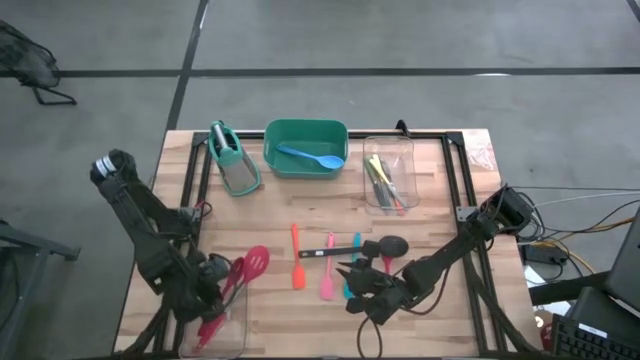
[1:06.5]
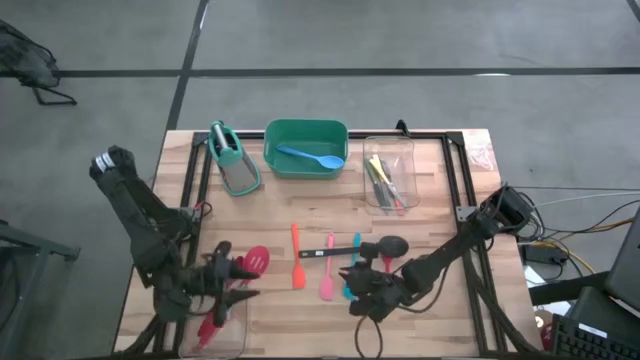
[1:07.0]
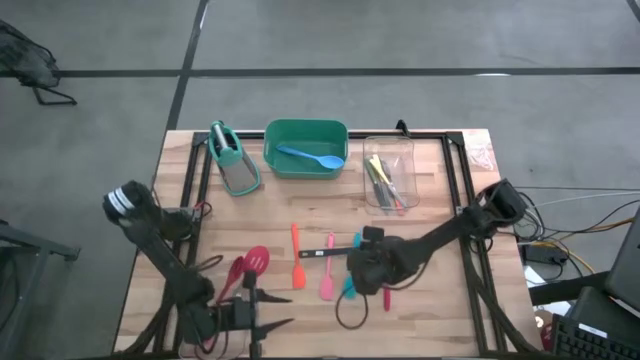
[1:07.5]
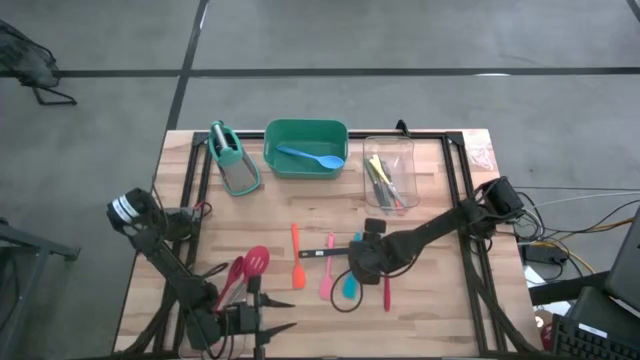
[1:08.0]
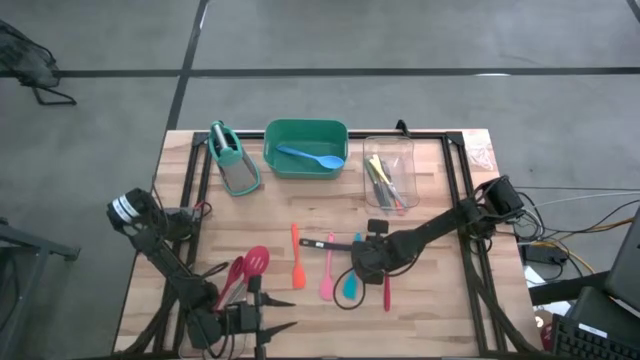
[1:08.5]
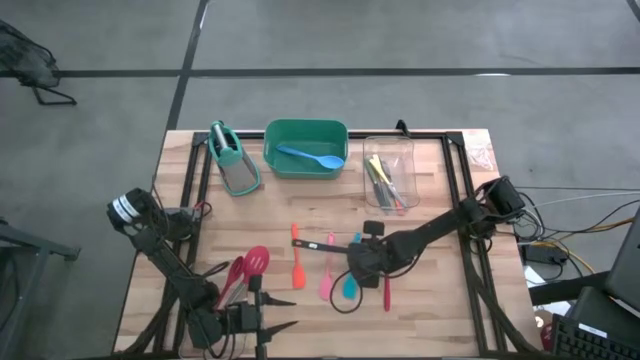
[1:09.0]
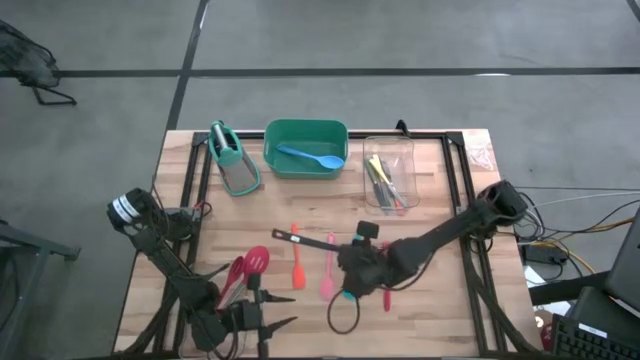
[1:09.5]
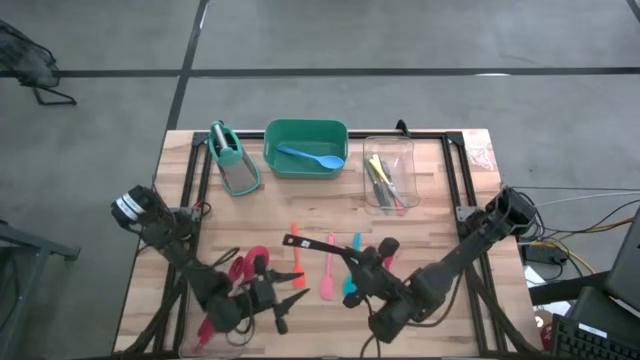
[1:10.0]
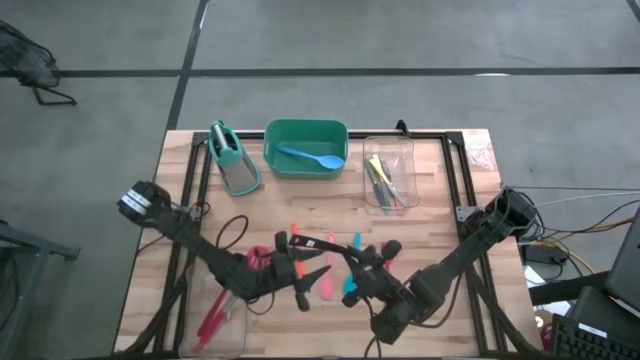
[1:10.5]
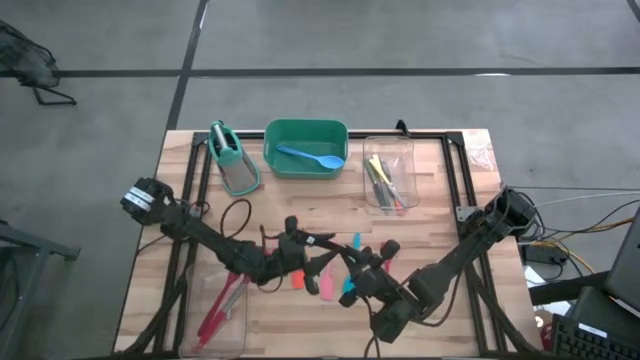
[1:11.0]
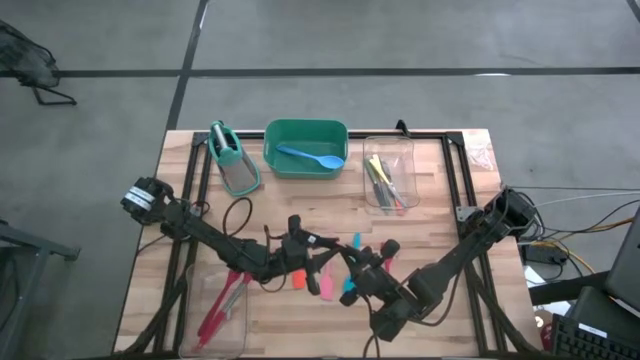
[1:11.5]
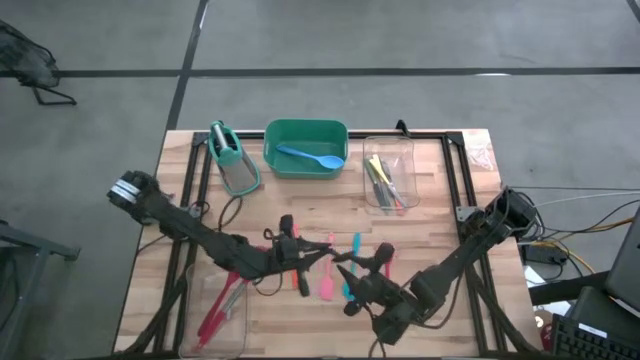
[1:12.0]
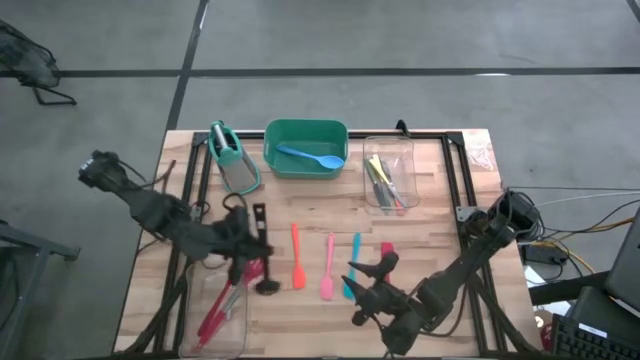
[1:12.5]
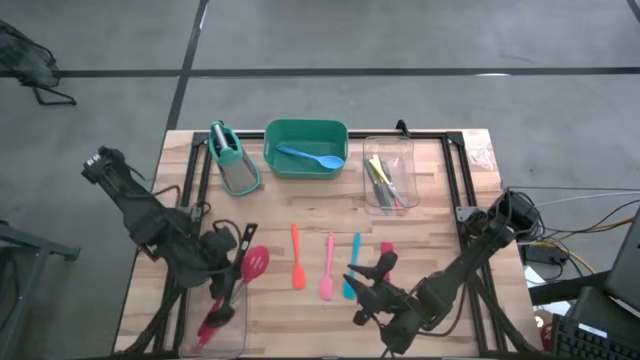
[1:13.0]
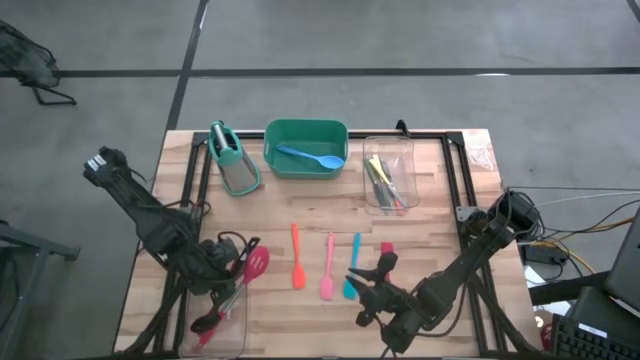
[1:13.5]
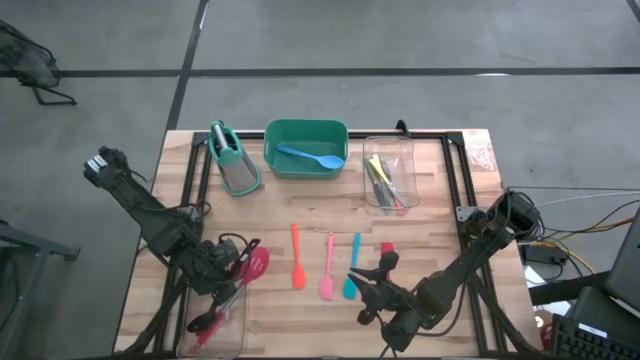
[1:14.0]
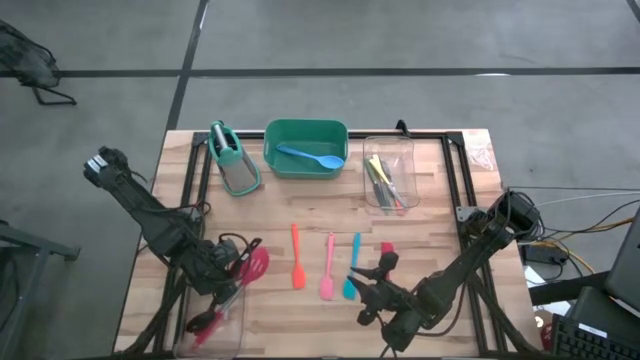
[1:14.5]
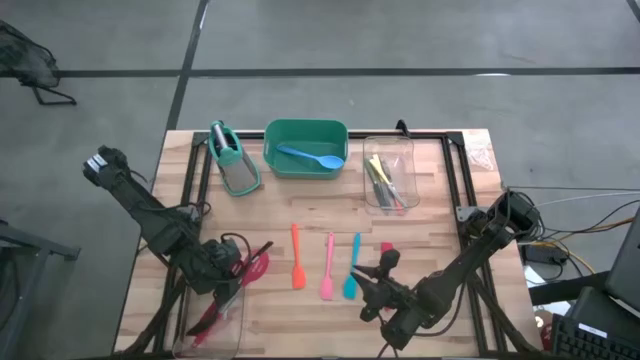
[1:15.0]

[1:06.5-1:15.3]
Task: Pick & Place Kitchen Items
Put the black slotted spoon into the bottom transparent bin

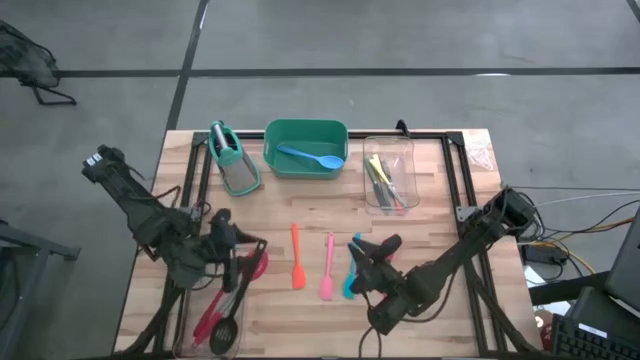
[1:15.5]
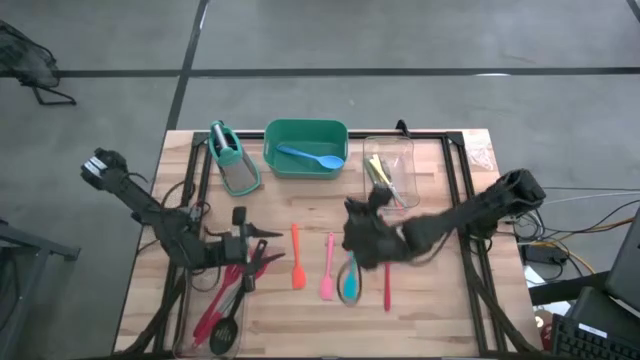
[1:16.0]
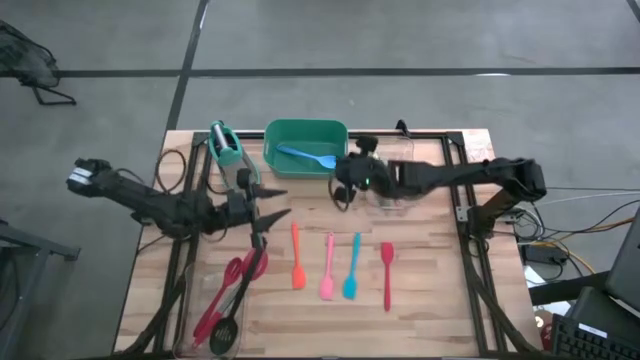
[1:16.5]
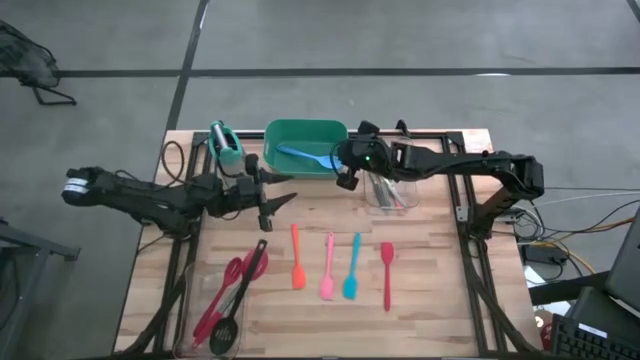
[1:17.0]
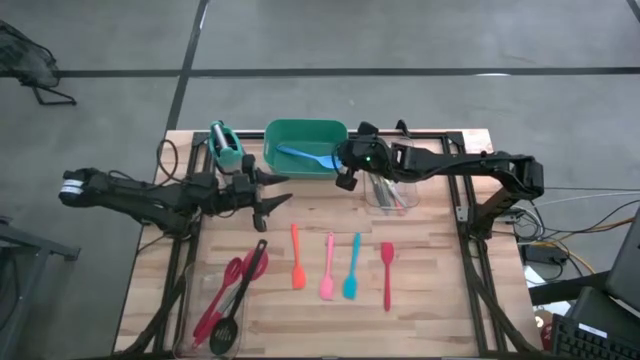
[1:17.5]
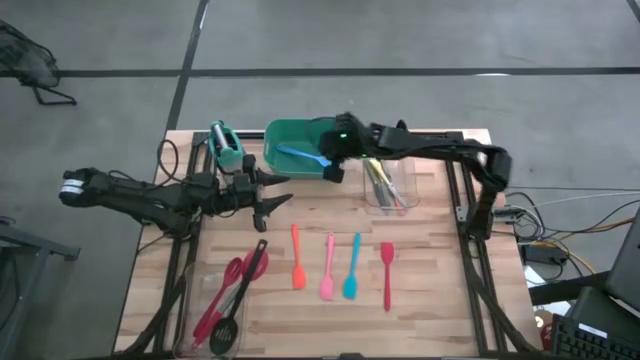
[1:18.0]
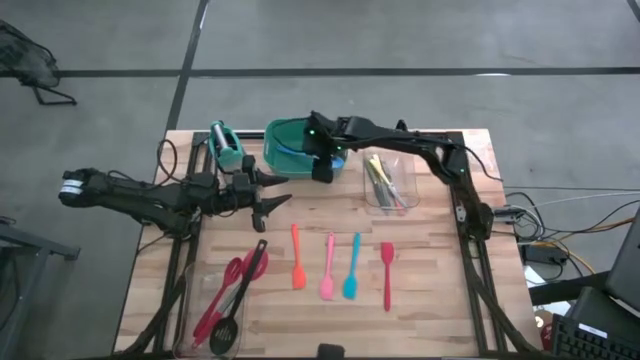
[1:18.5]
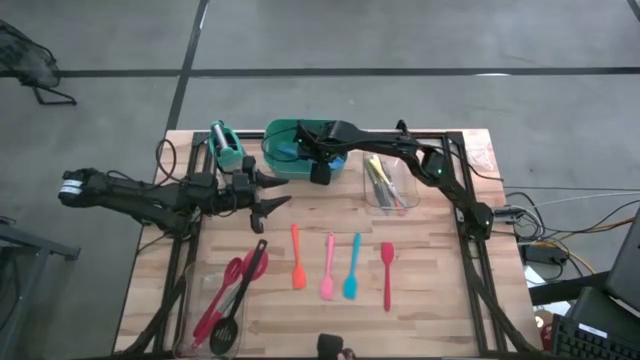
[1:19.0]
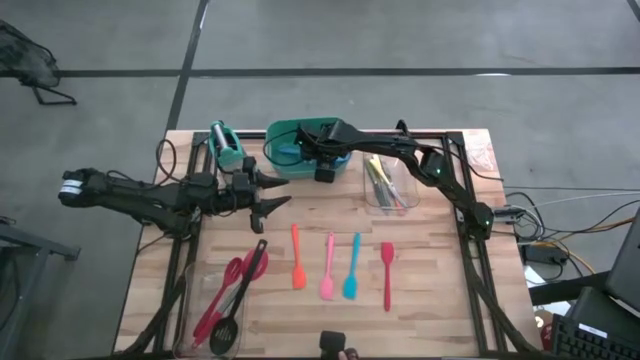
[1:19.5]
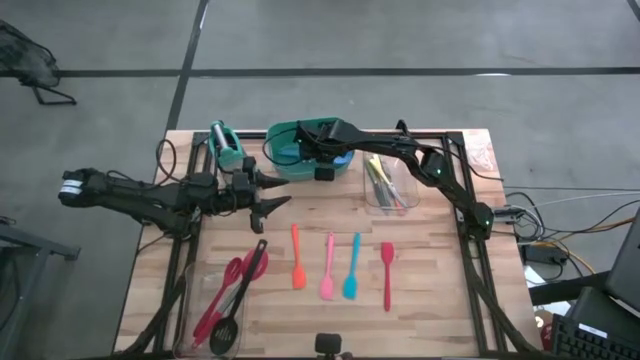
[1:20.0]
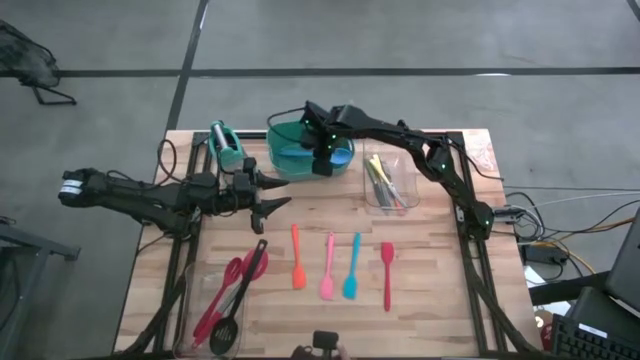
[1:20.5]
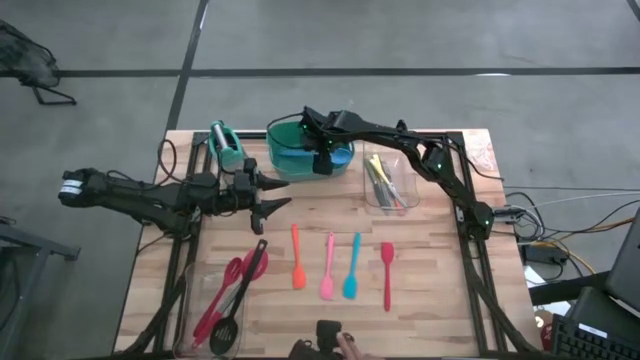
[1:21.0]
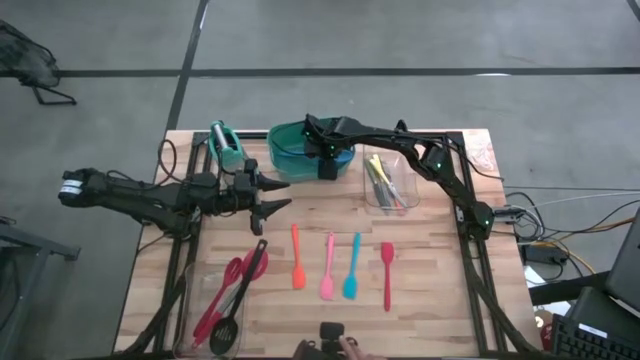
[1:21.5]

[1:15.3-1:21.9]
Put the blue serving spoon into the bottom transparent bin

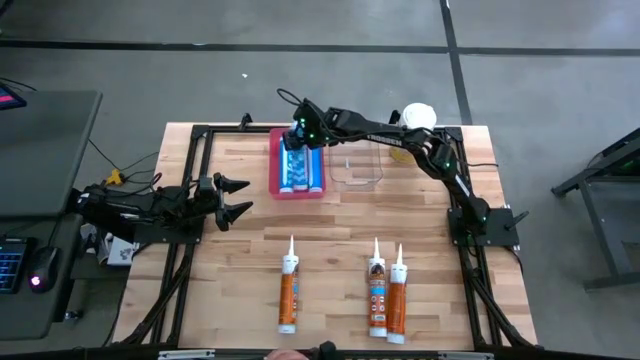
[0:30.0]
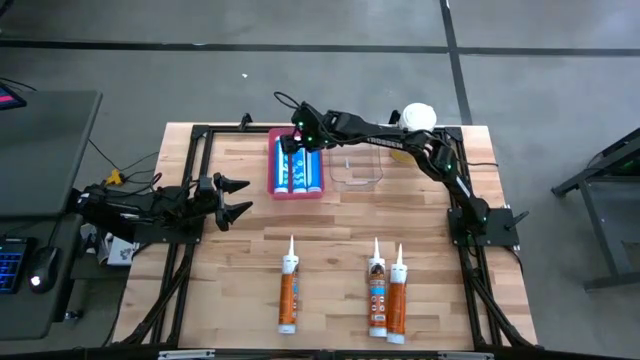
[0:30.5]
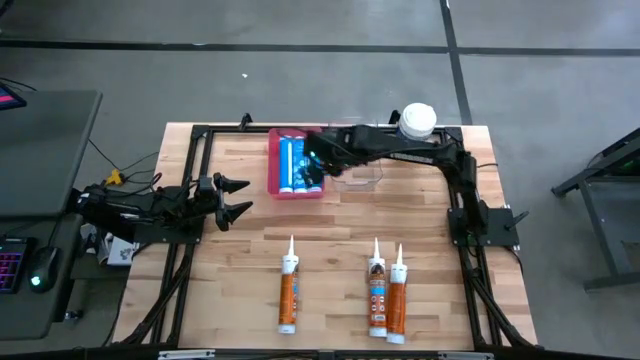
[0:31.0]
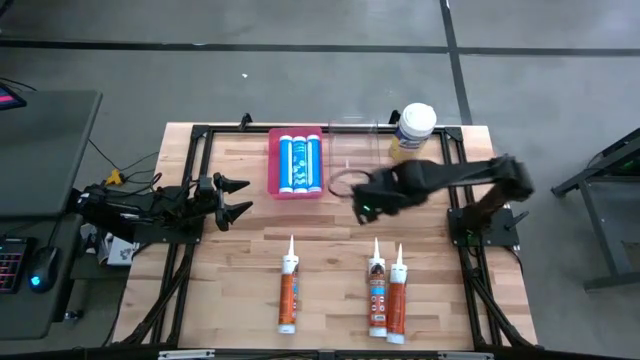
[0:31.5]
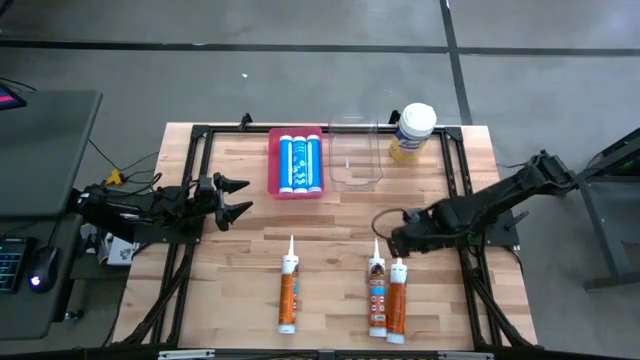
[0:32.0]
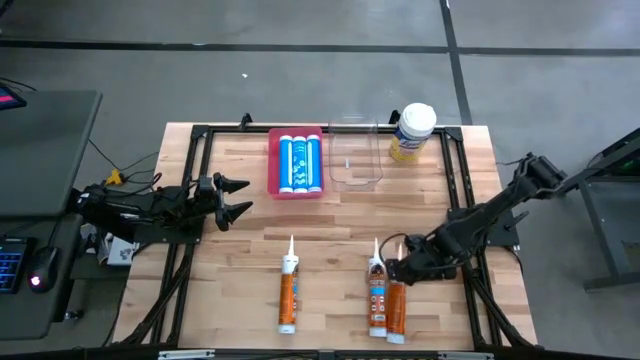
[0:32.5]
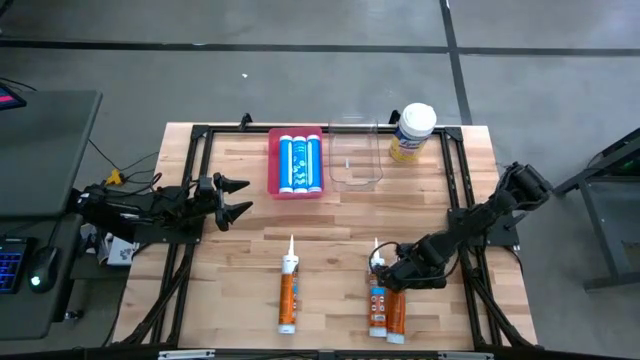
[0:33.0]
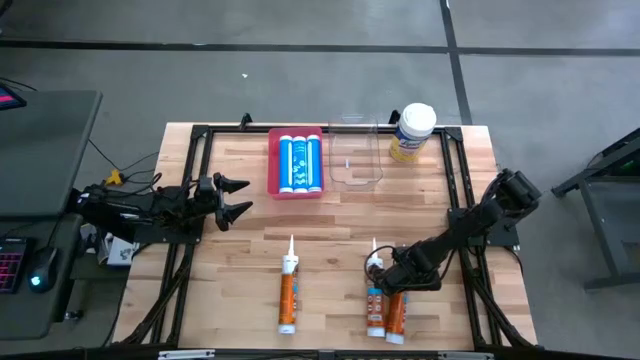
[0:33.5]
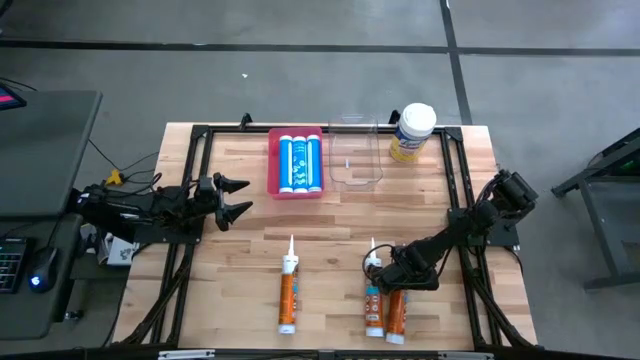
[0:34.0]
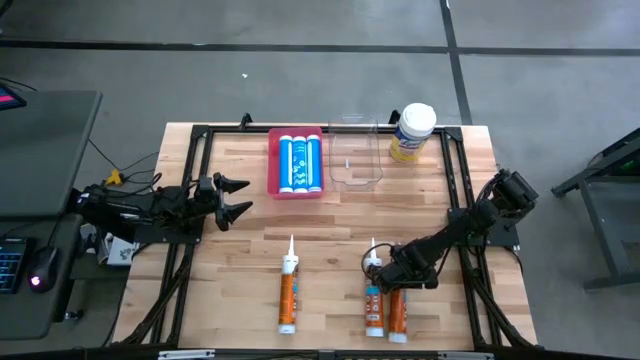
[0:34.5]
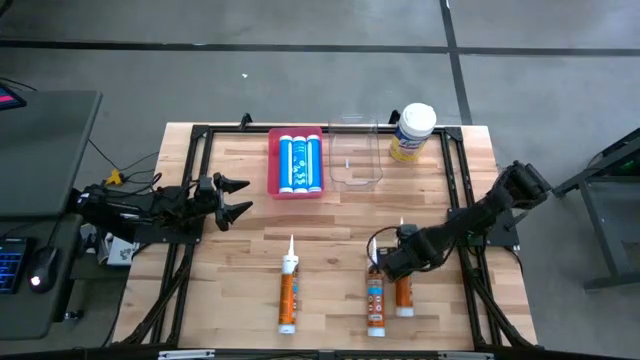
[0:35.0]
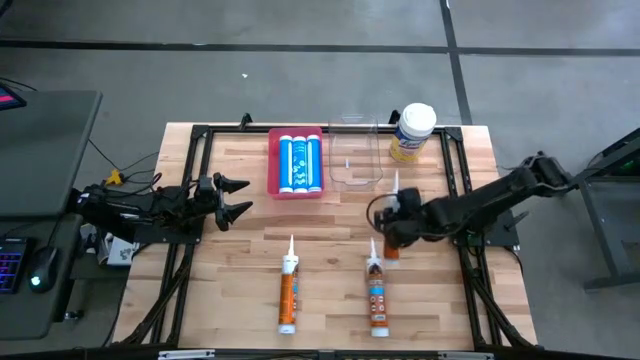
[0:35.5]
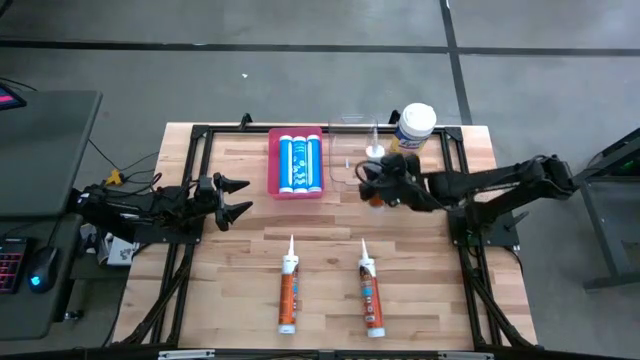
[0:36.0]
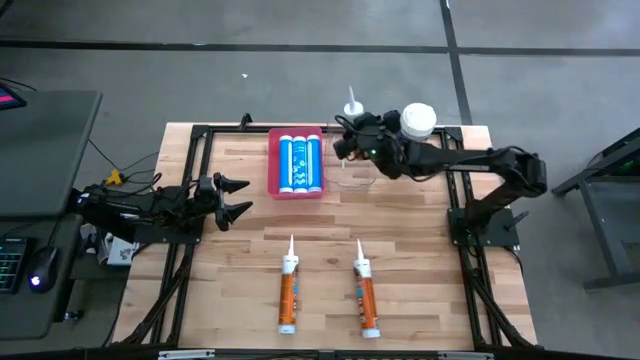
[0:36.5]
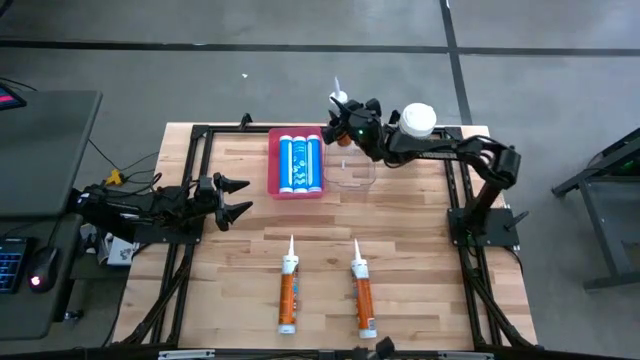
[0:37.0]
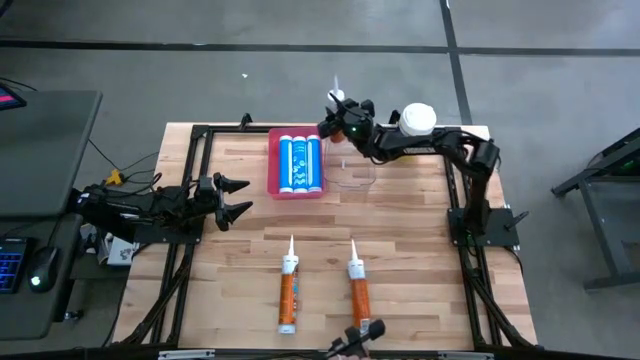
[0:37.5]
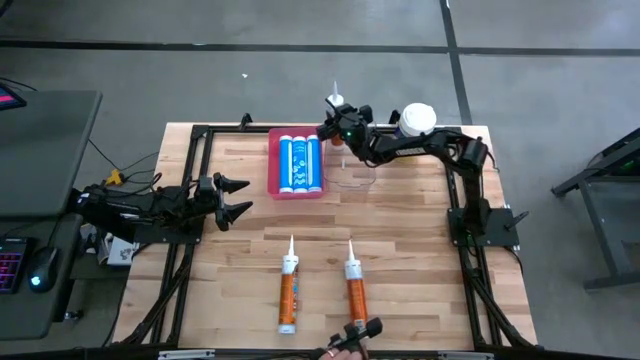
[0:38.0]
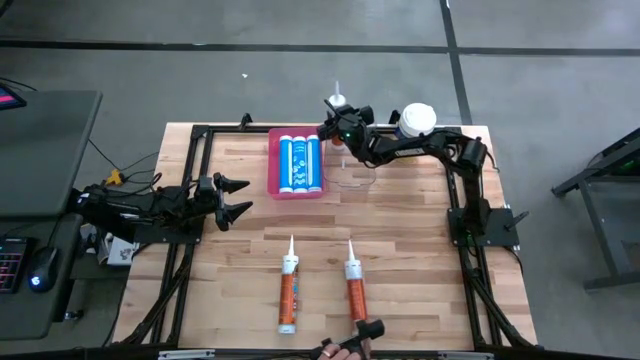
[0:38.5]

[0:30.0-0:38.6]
Task: Pick & place silicon tubes, Sealant and Lysol wipes
Put the right orange sealant into the transparent bin
